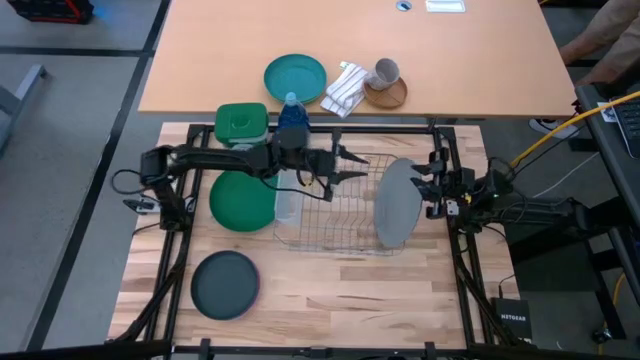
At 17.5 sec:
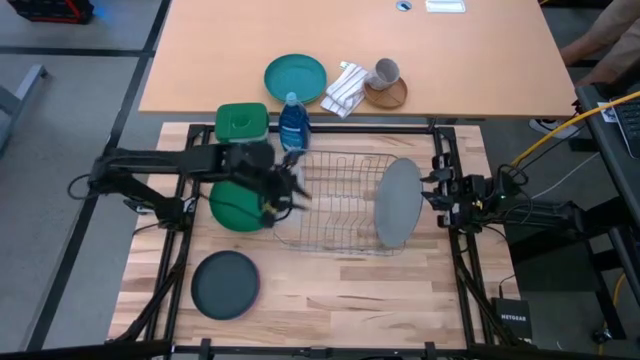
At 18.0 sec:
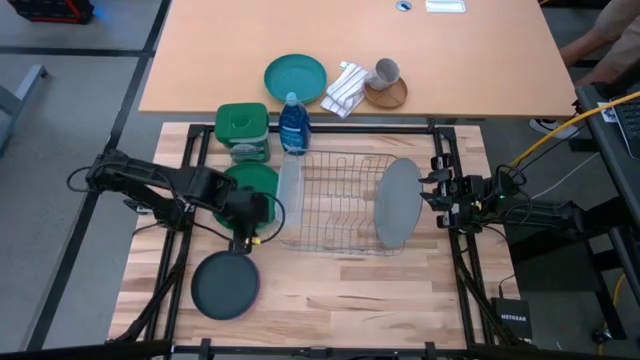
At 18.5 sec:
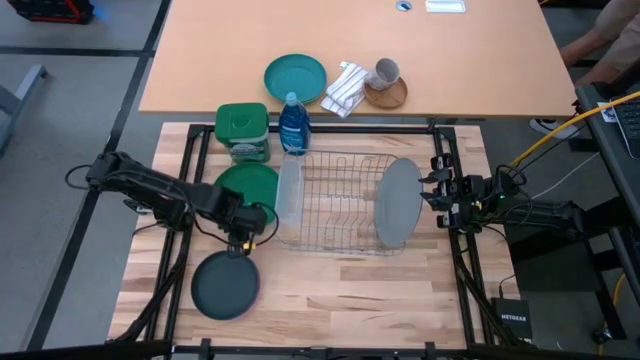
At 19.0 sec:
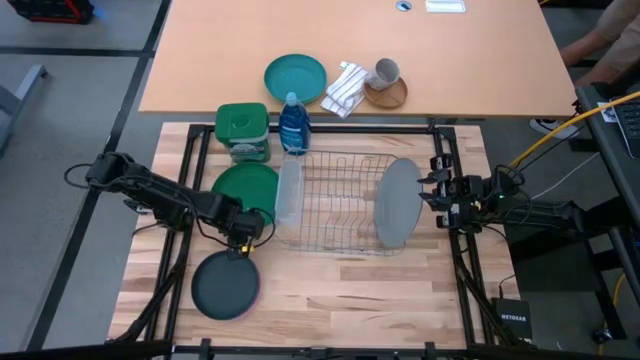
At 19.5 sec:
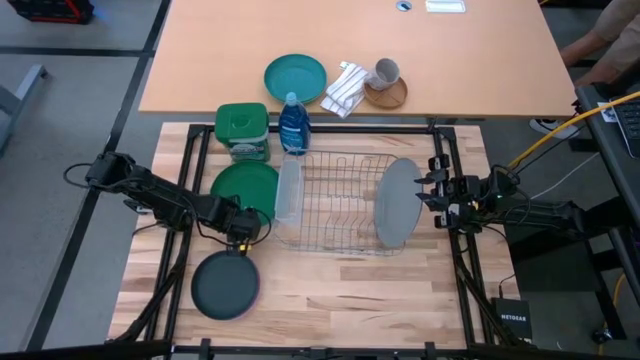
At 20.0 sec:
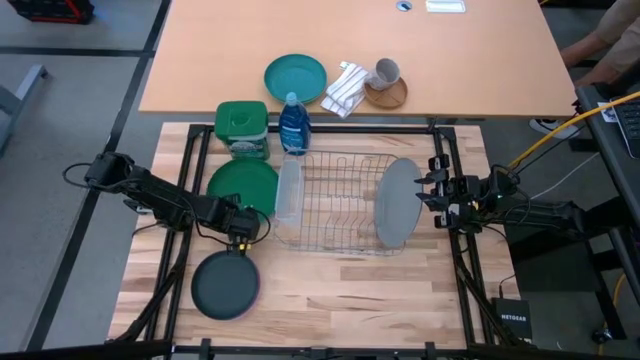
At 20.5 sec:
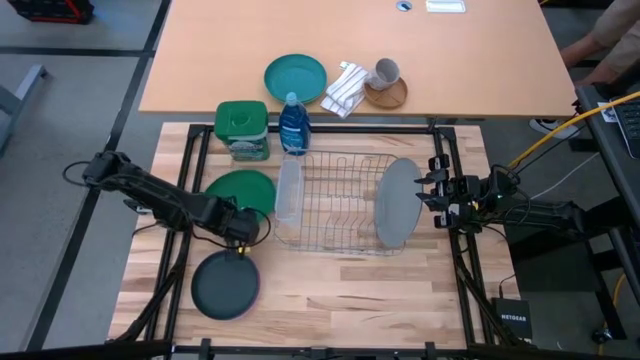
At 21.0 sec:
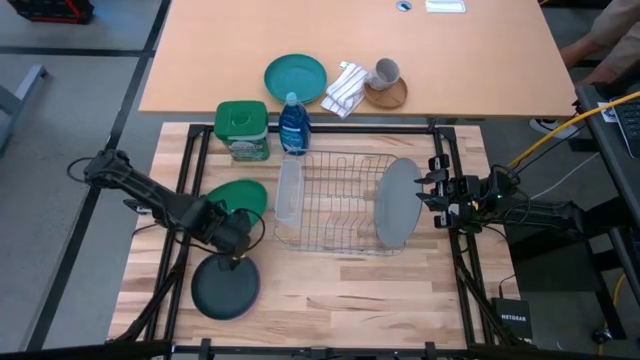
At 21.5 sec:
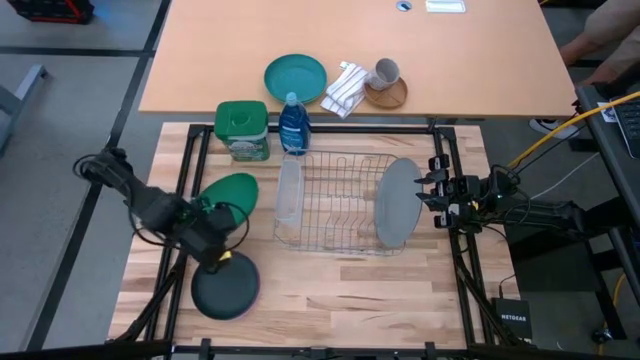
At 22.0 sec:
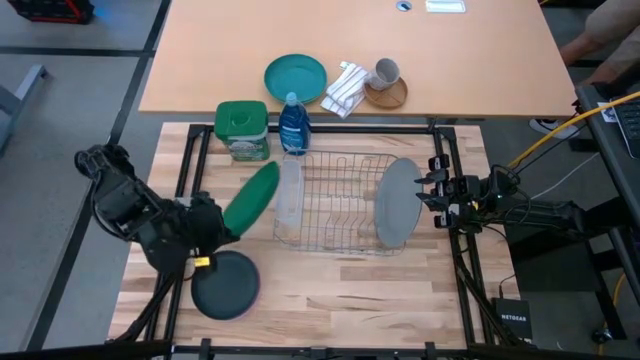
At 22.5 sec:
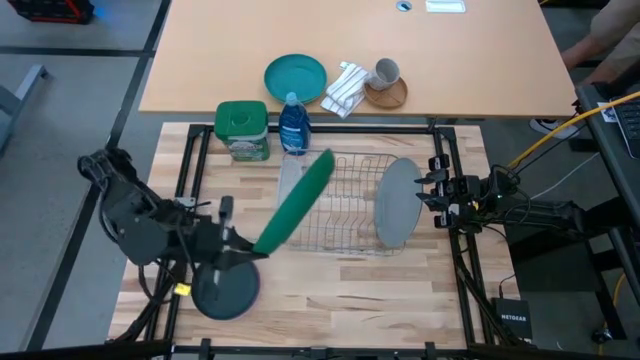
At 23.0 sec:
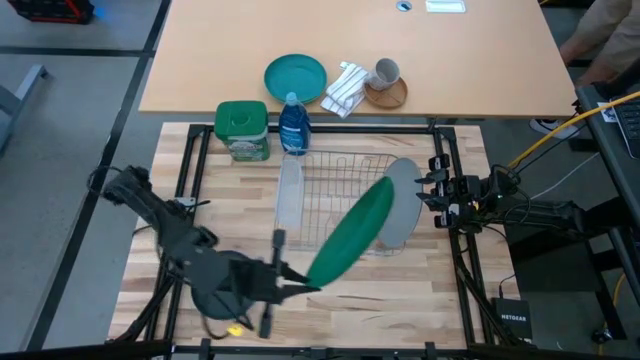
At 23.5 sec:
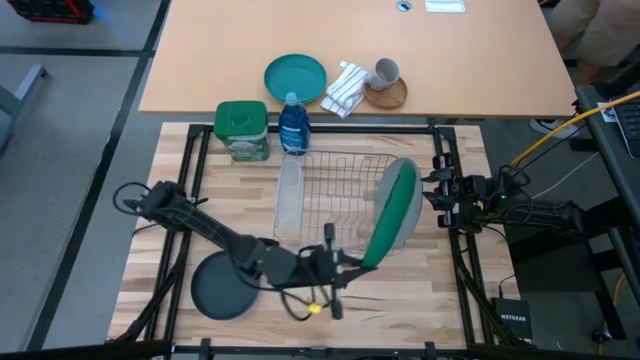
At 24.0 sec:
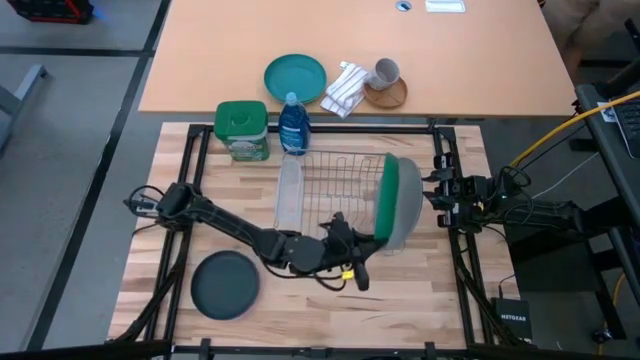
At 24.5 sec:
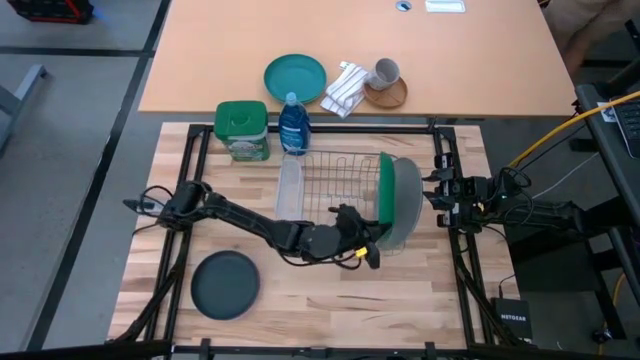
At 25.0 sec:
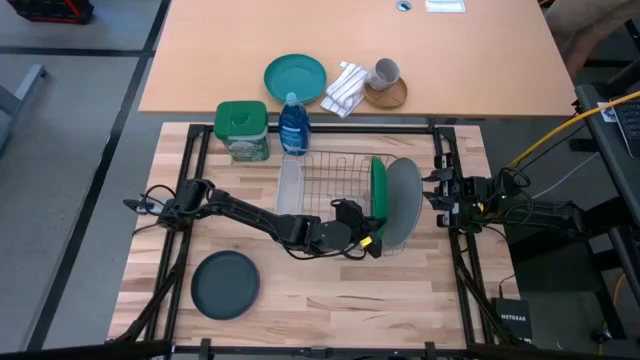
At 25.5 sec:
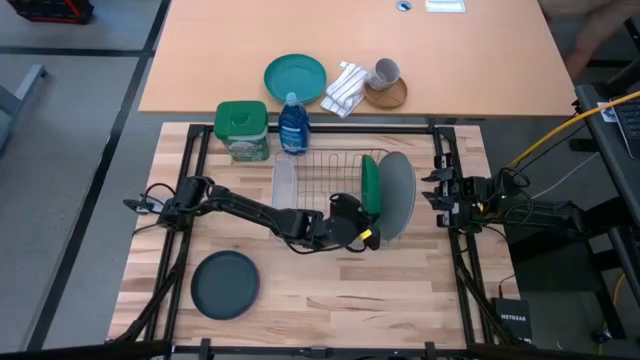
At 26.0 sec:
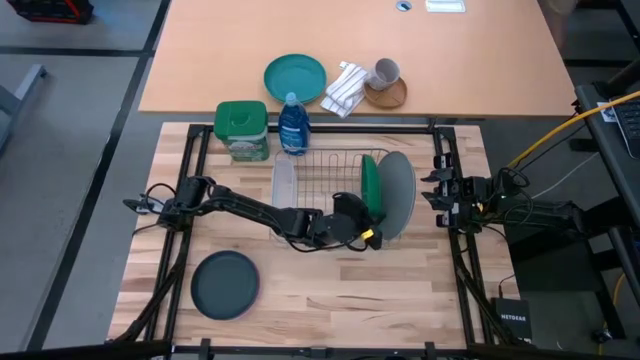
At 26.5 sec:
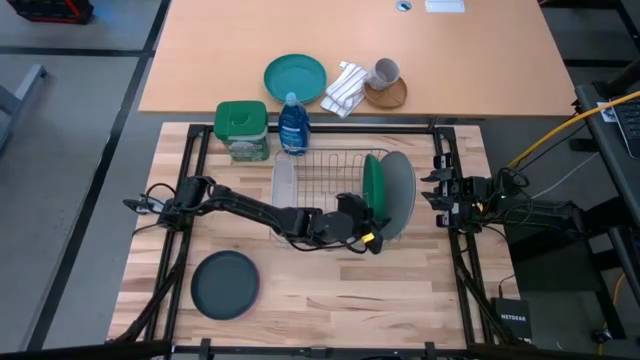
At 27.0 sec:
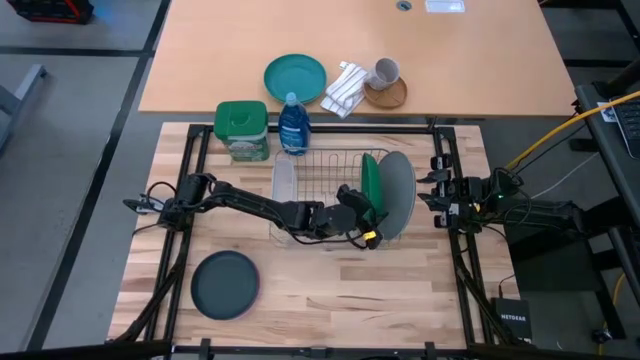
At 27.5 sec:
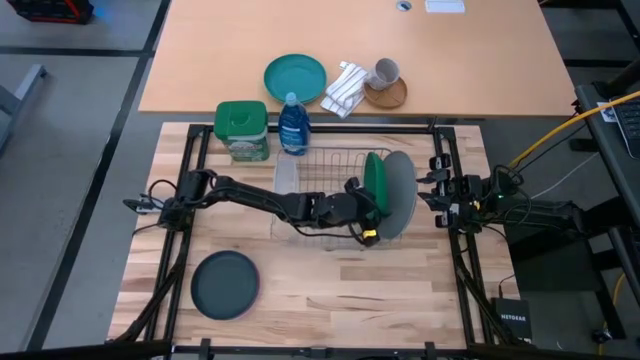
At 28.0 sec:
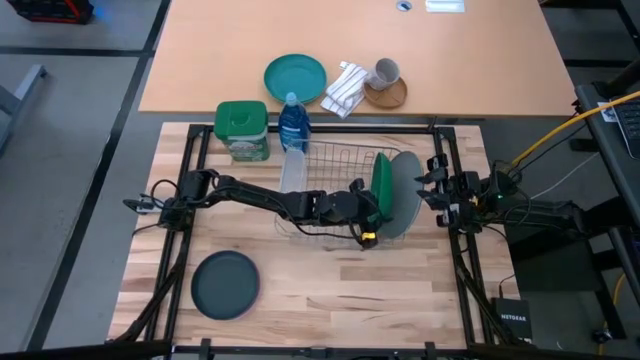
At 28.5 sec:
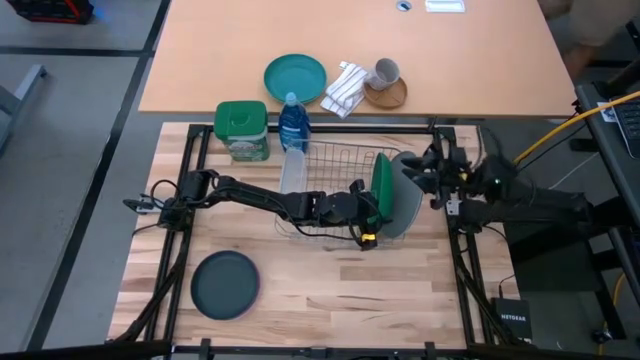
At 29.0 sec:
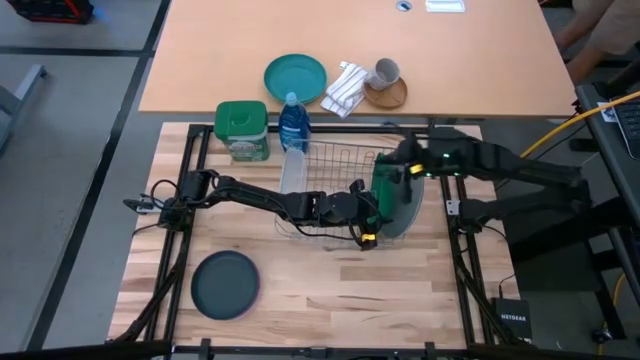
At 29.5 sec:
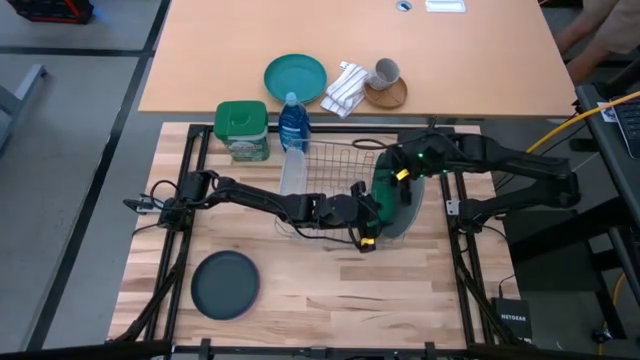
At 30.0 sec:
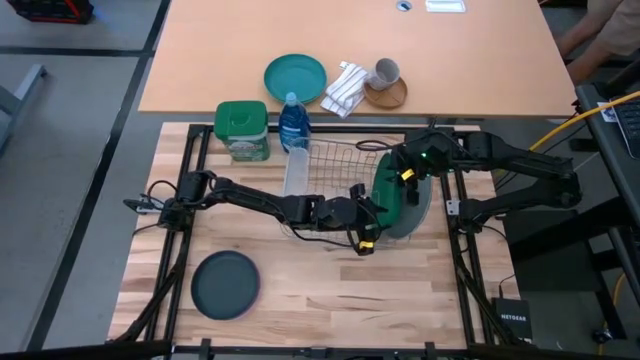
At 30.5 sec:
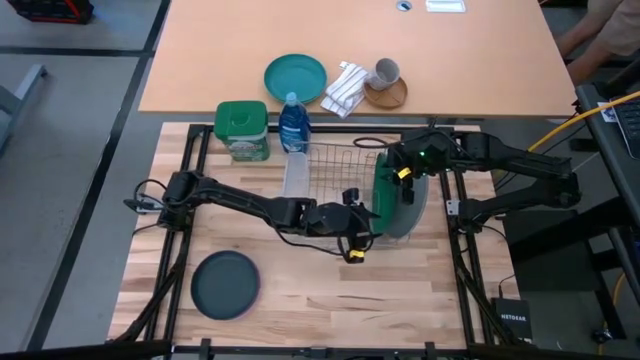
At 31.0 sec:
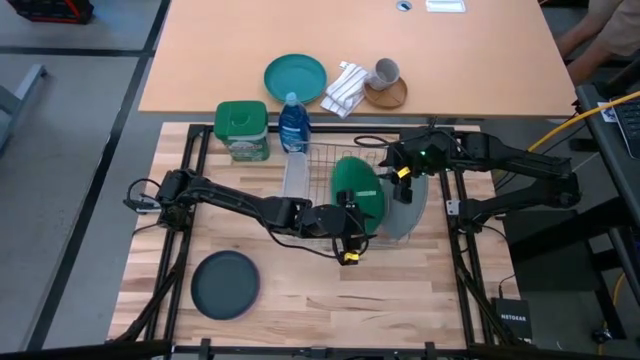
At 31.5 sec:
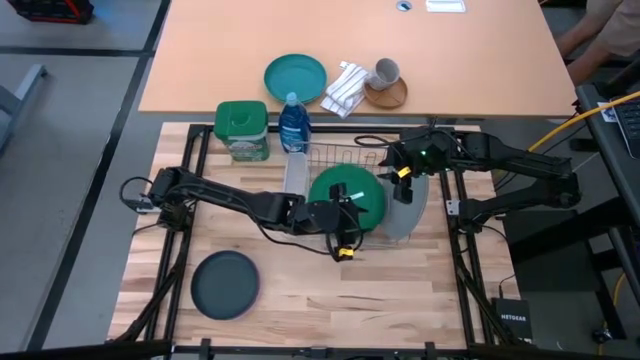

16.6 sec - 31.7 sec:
Task: Sort dishes
Put the green plate into the dish rack
